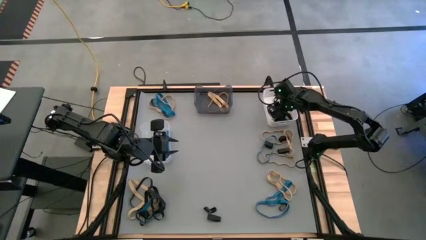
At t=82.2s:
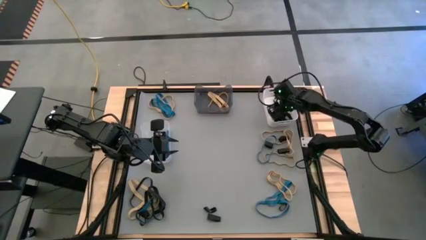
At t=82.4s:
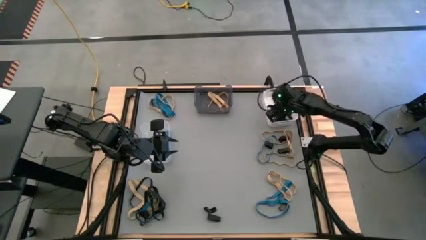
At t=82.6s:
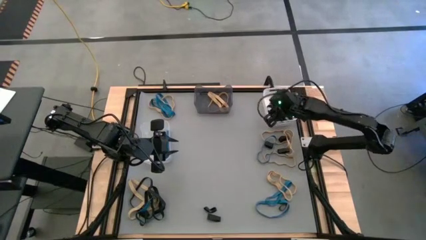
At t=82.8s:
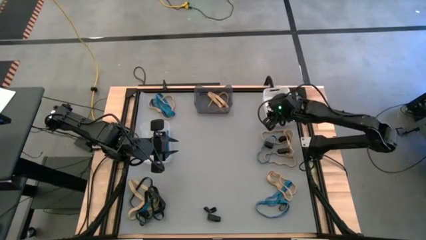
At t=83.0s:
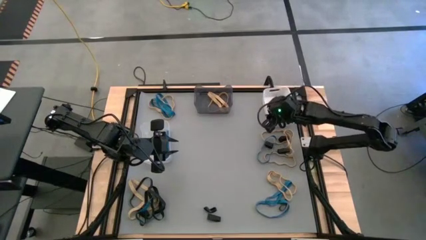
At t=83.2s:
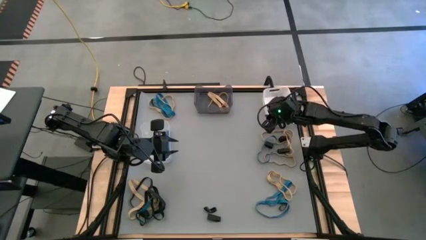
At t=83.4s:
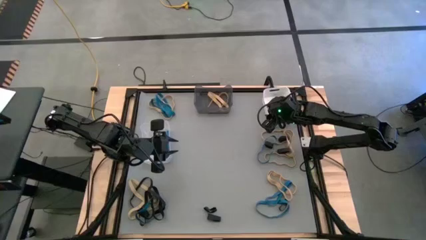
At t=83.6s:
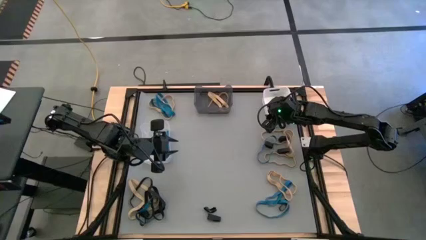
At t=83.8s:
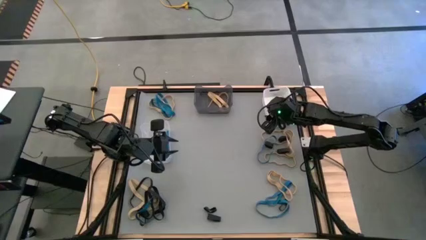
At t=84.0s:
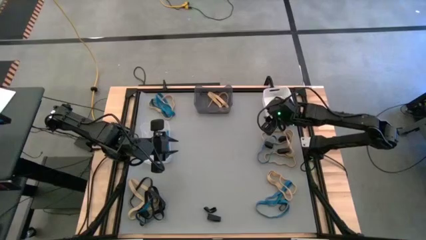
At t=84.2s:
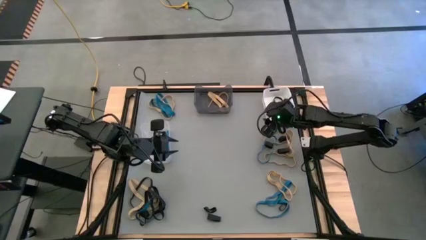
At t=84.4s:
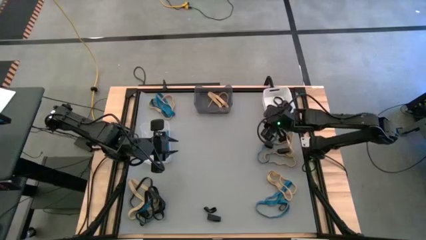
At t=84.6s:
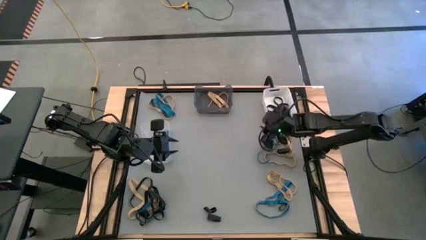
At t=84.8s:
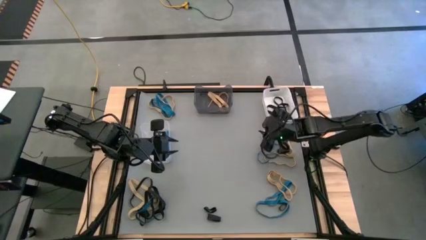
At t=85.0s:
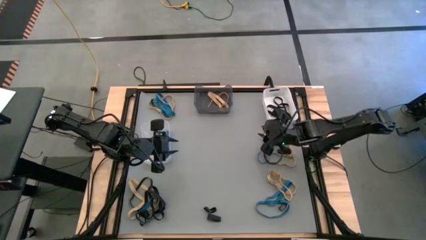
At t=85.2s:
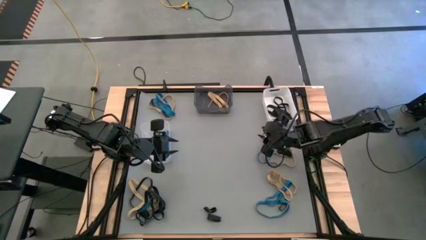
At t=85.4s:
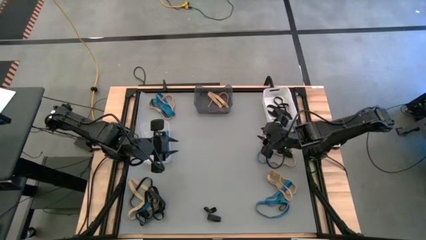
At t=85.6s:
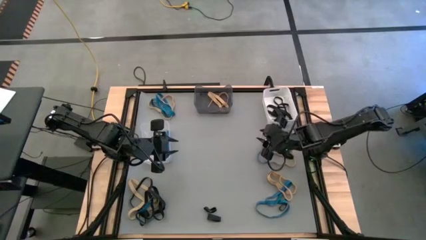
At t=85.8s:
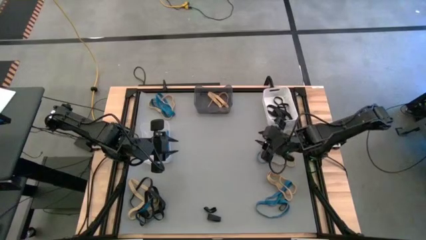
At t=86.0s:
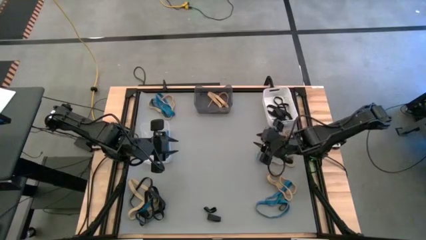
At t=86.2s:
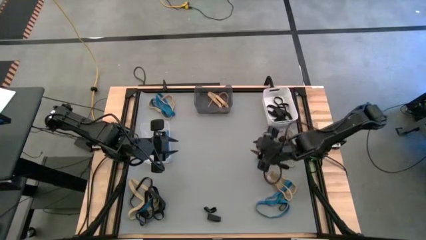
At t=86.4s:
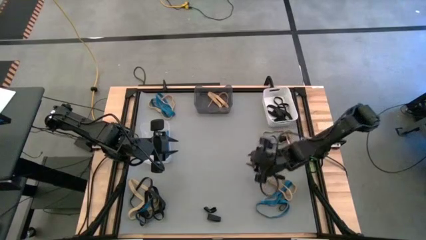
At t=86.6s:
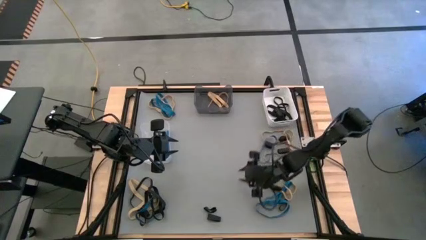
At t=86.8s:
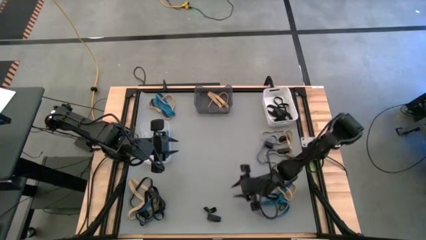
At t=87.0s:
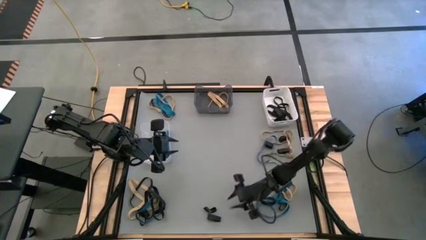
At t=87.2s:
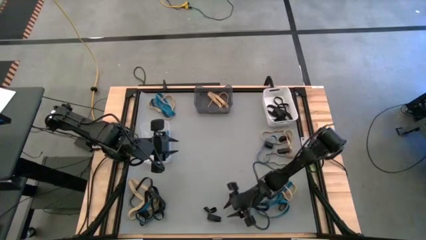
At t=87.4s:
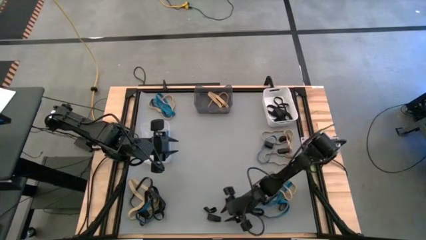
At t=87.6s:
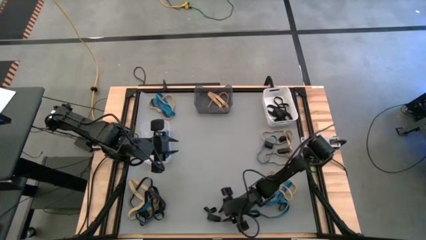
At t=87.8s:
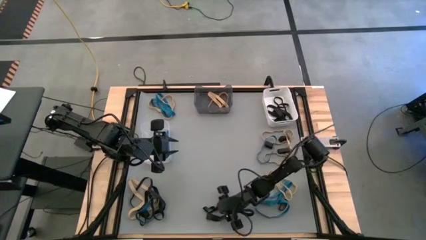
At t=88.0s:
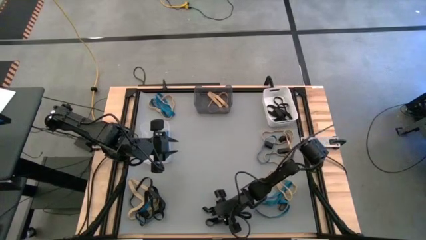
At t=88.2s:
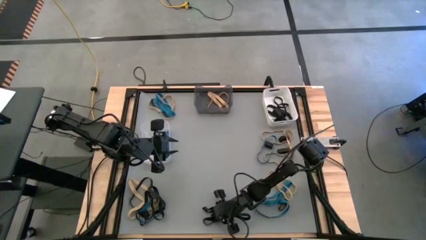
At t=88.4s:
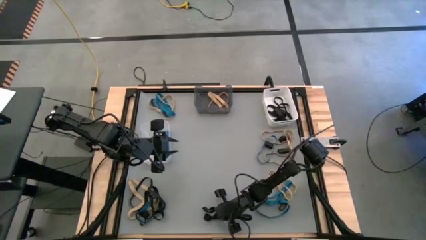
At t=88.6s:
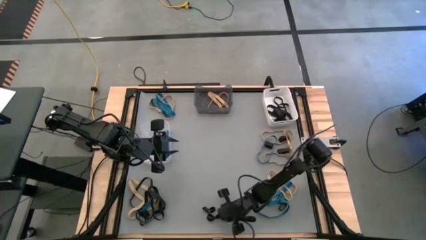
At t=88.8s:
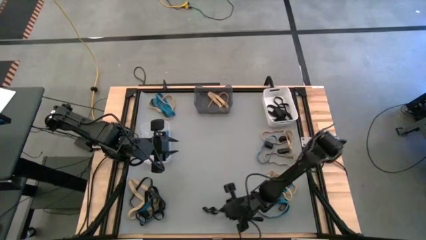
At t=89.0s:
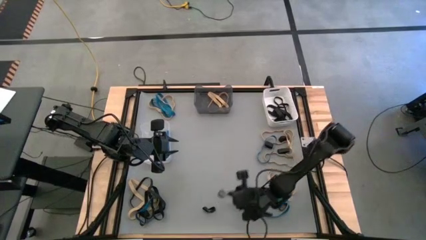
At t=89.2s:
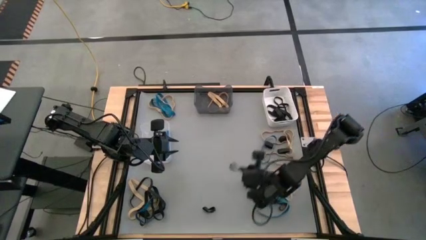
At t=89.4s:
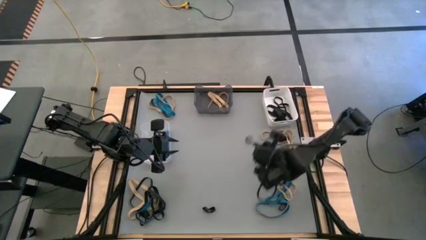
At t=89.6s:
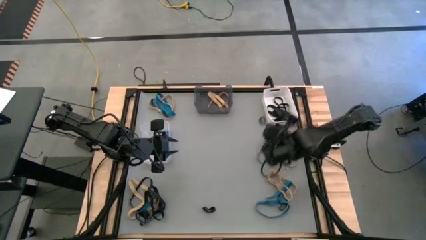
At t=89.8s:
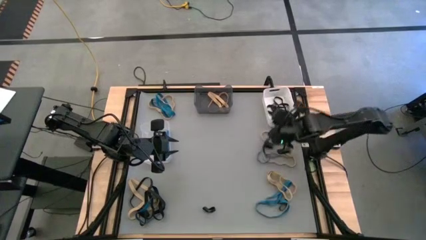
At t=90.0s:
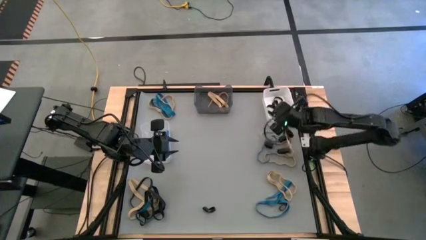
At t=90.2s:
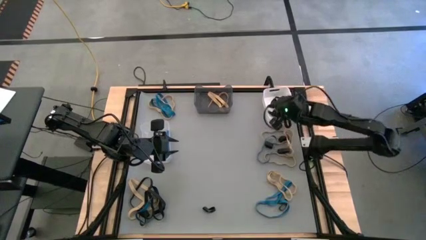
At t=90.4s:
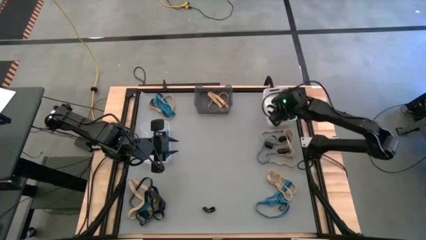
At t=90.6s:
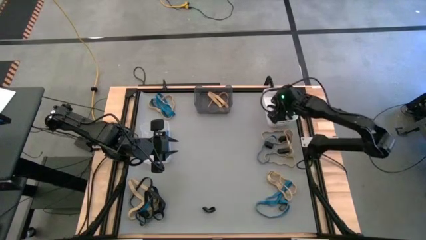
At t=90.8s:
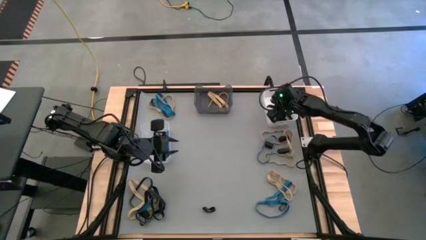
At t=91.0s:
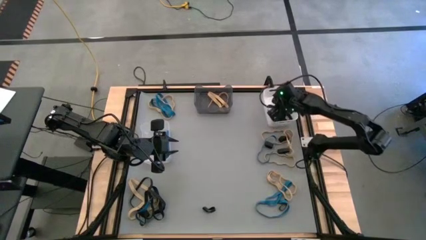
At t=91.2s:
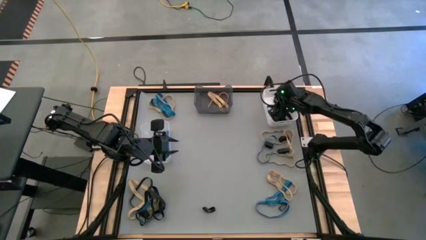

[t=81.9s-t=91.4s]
Task: Sort rubber bands into baskets
Put the black rubber band into the white bin

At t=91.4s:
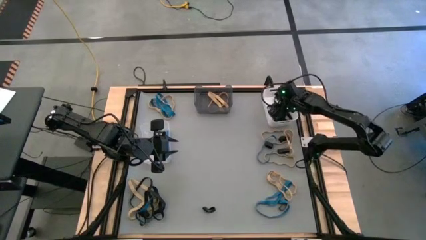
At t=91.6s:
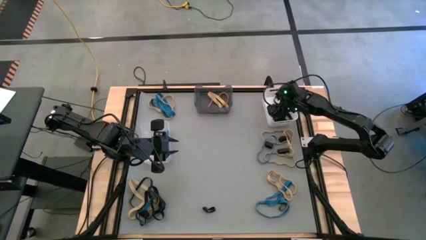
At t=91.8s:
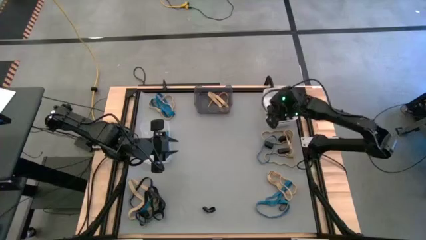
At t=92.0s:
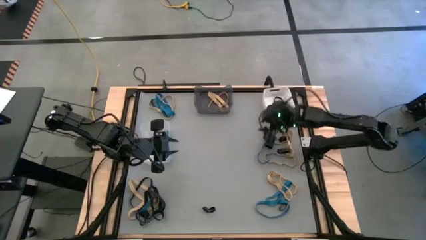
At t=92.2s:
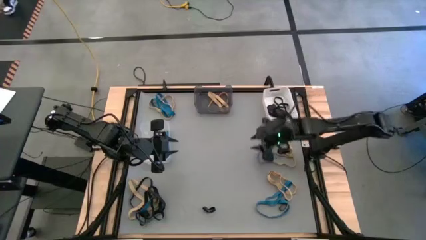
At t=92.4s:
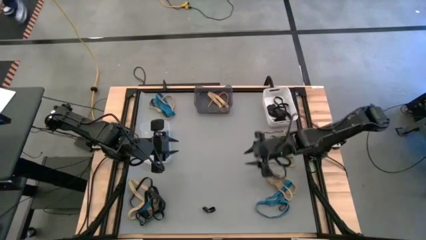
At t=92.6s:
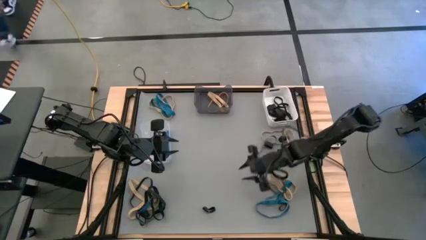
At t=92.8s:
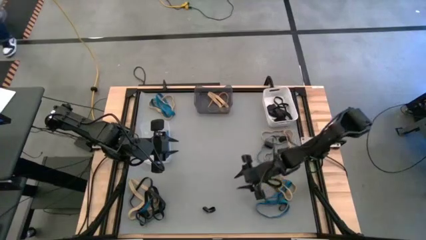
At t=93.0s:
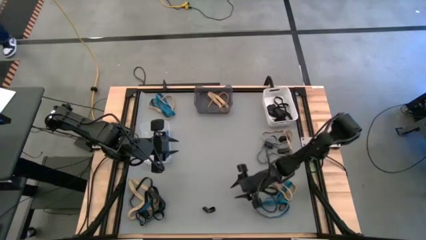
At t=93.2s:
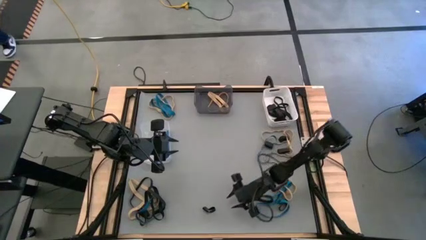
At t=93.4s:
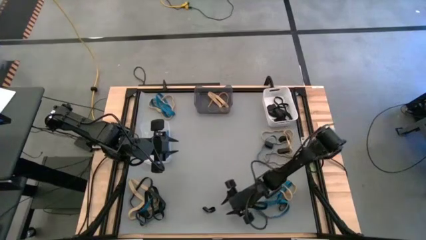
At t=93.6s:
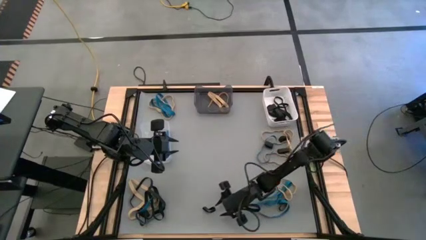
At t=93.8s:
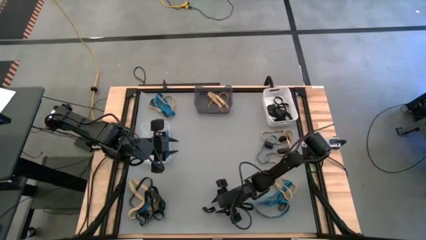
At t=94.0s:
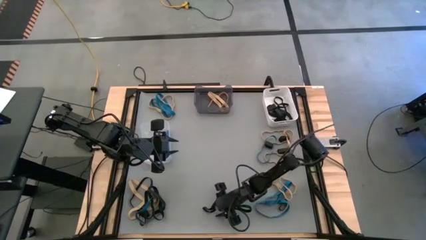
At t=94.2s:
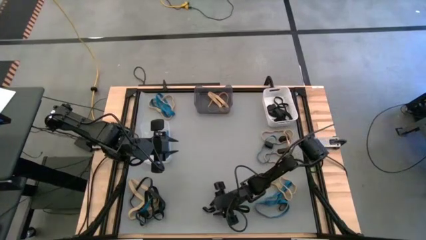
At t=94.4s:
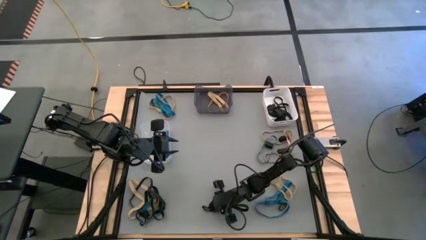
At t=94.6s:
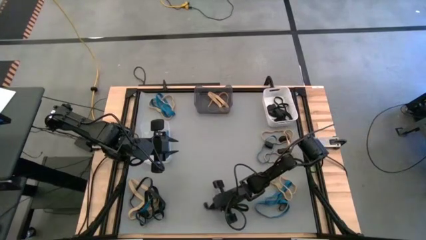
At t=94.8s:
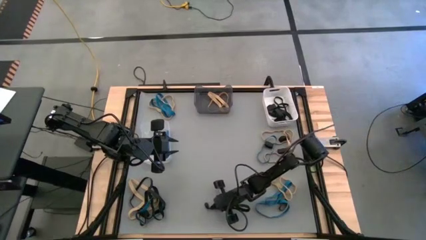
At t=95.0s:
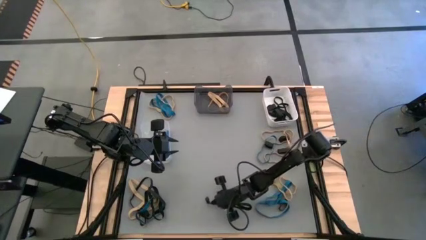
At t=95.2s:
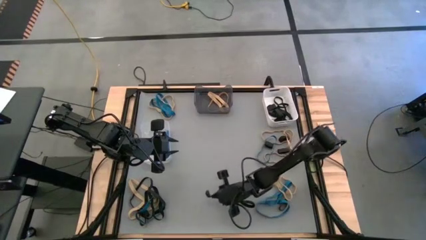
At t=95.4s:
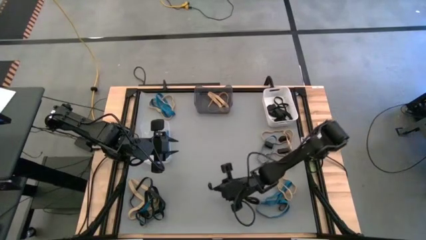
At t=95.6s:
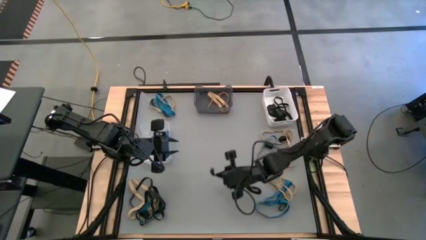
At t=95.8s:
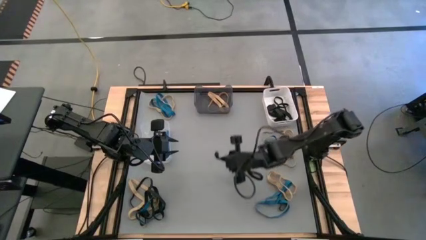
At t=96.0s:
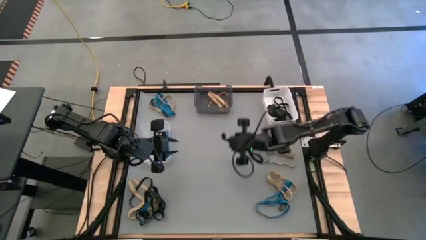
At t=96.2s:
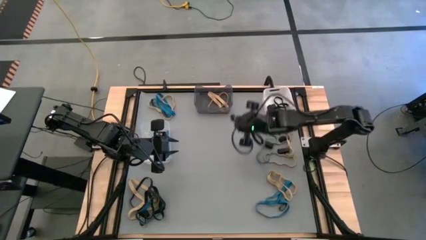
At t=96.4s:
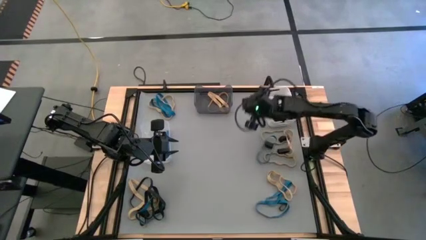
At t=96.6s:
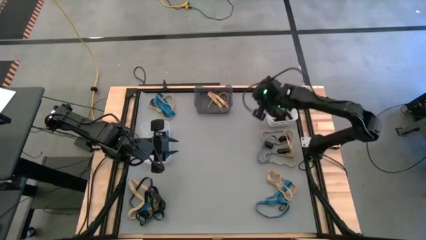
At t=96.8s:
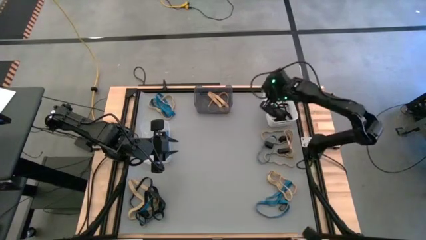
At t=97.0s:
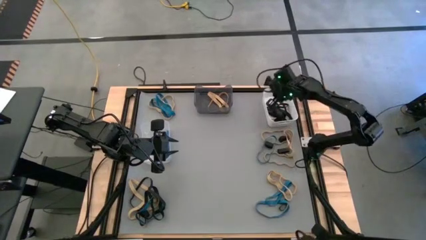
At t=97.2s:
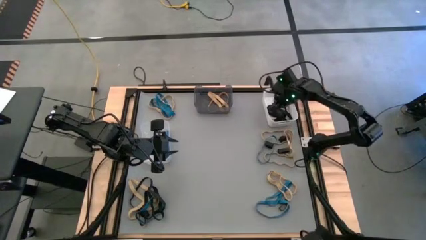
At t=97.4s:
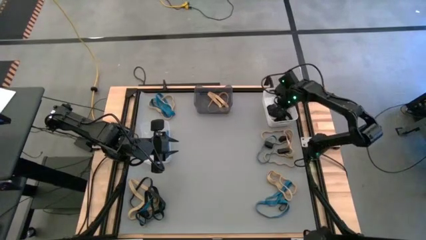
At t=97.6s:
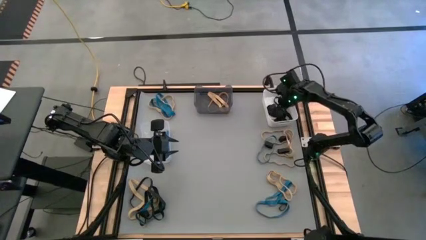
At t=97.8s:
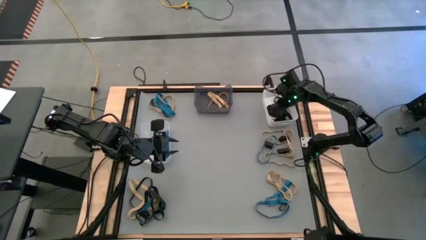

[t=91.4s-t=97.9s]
Put the black rubber band into the white bin
